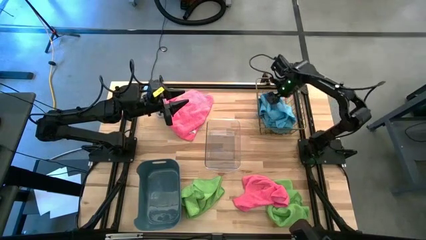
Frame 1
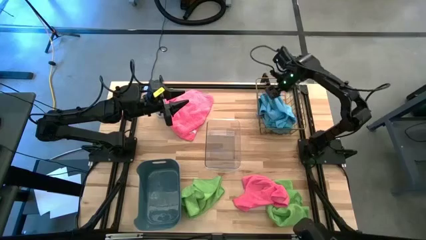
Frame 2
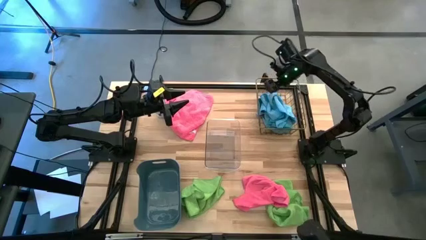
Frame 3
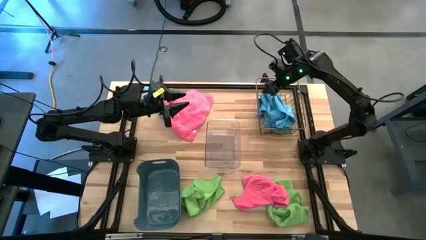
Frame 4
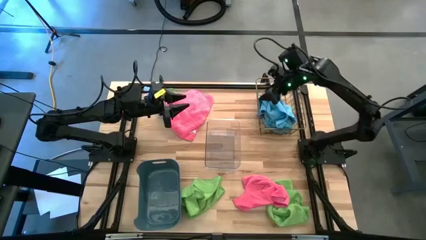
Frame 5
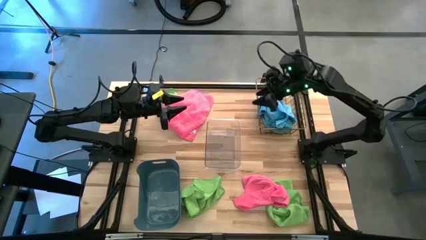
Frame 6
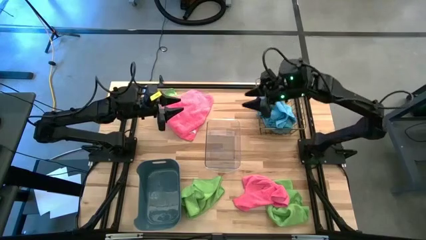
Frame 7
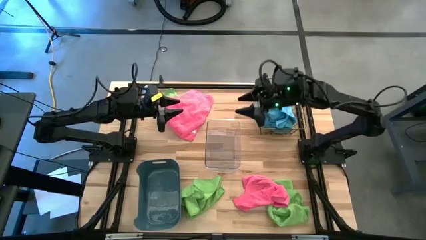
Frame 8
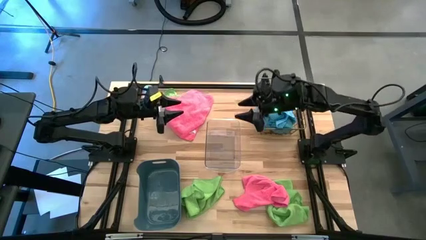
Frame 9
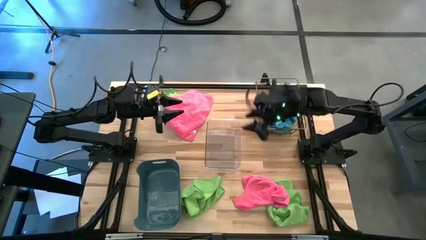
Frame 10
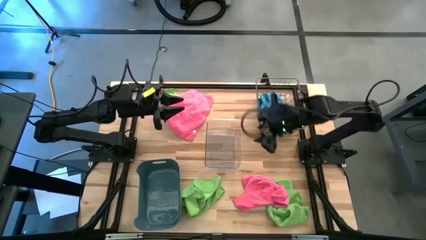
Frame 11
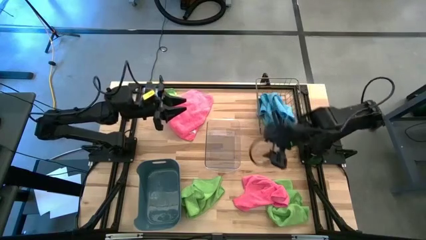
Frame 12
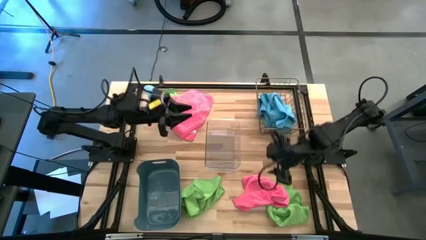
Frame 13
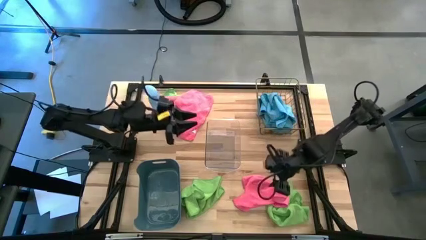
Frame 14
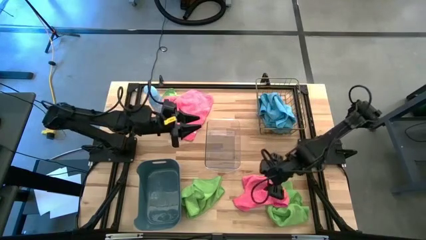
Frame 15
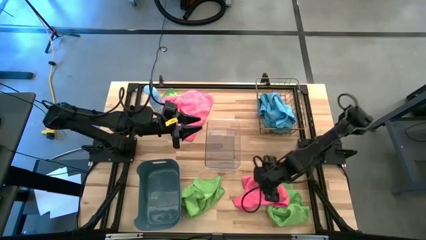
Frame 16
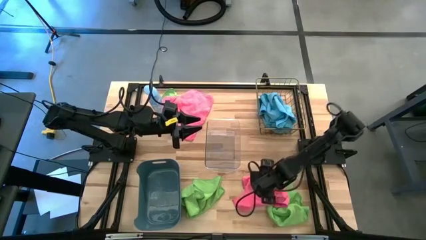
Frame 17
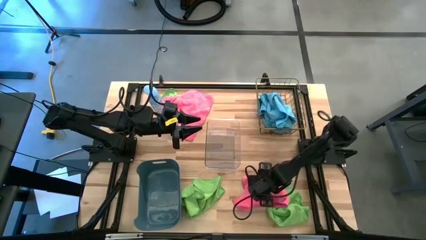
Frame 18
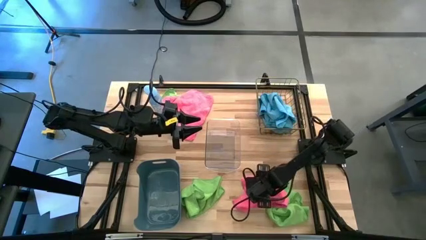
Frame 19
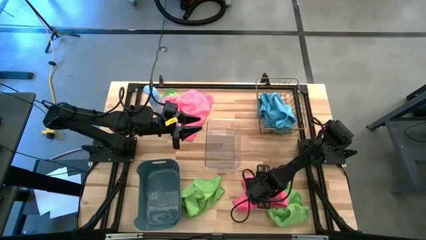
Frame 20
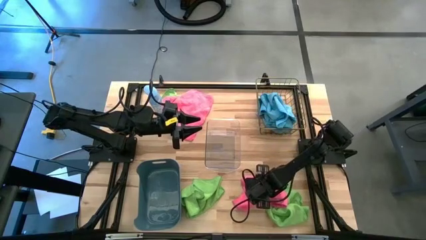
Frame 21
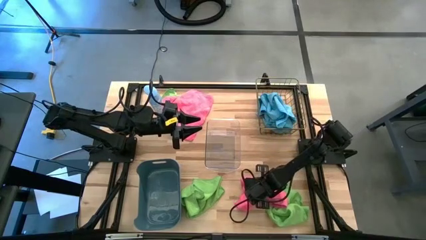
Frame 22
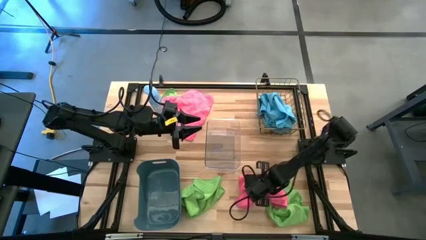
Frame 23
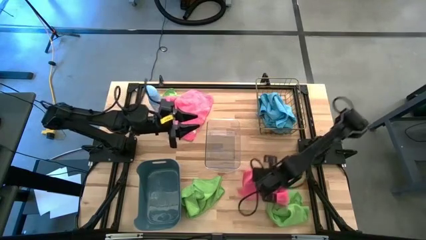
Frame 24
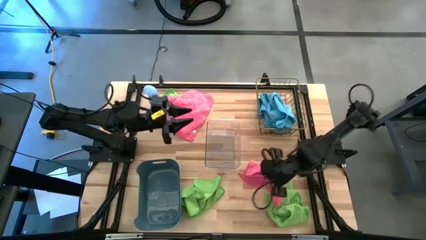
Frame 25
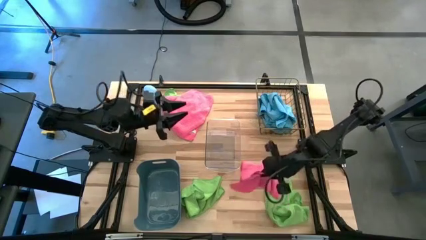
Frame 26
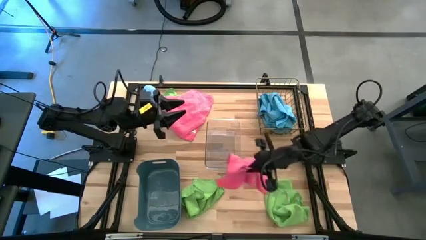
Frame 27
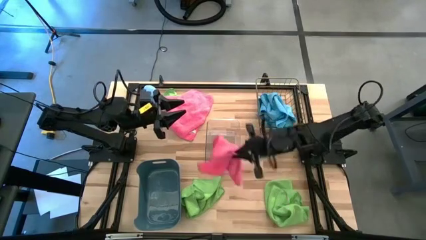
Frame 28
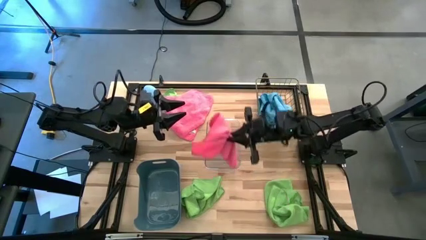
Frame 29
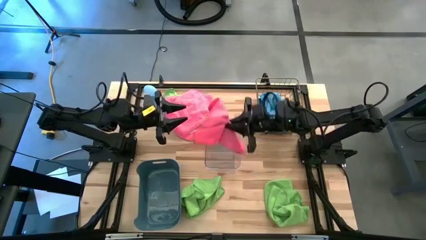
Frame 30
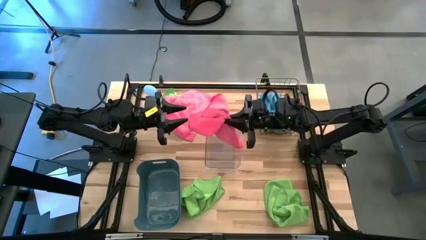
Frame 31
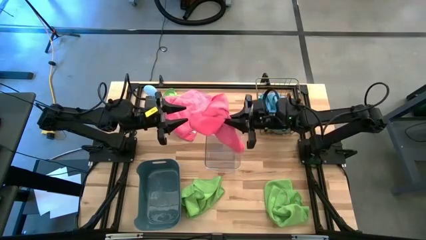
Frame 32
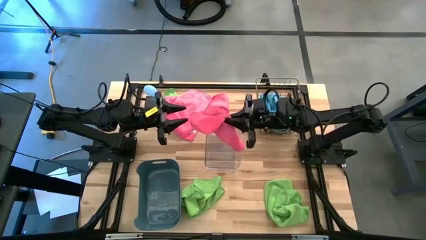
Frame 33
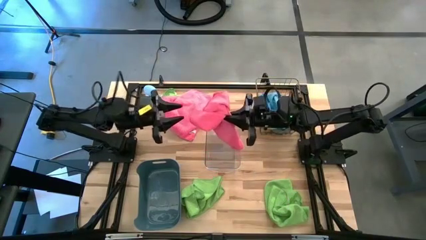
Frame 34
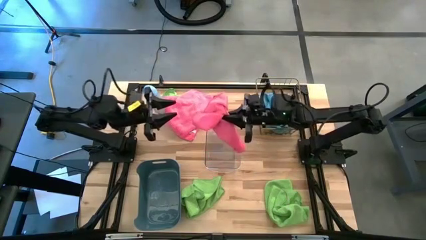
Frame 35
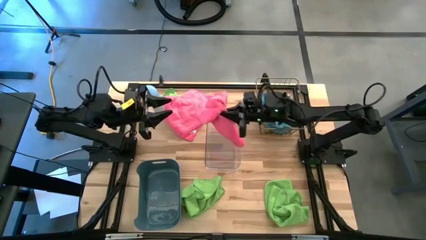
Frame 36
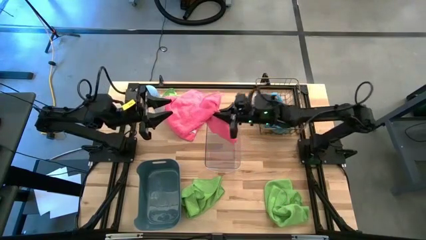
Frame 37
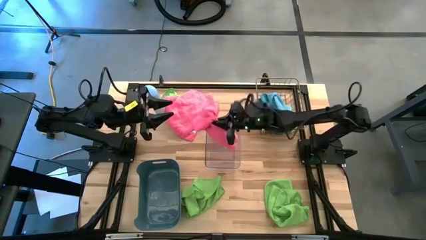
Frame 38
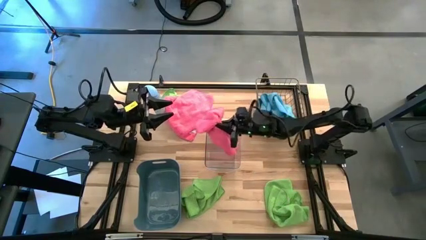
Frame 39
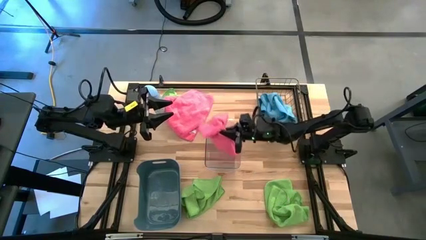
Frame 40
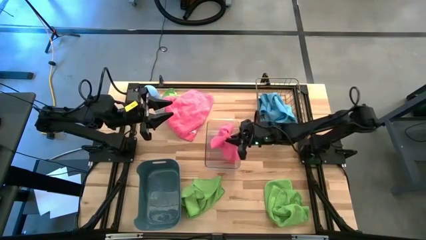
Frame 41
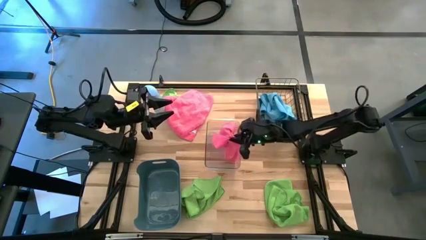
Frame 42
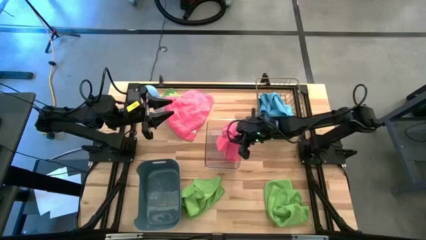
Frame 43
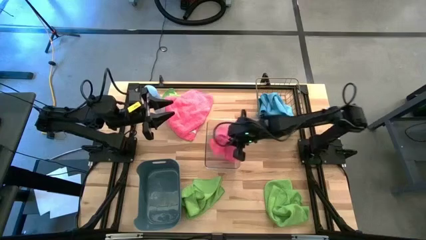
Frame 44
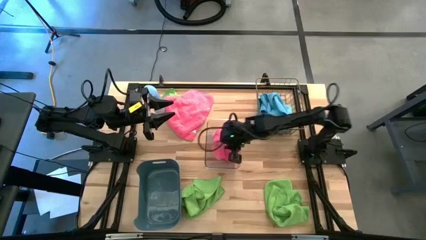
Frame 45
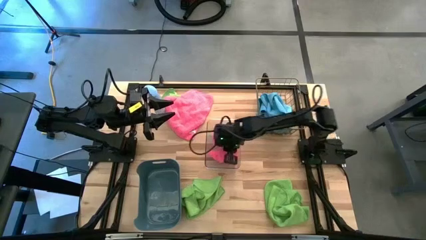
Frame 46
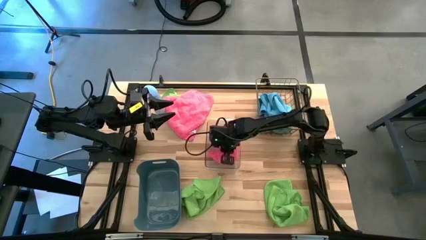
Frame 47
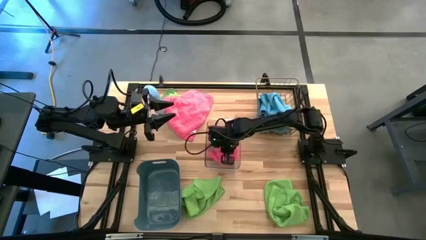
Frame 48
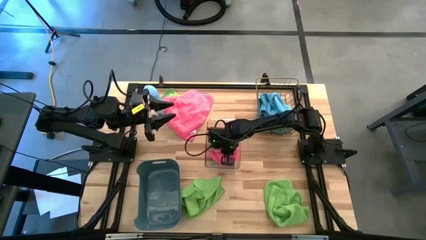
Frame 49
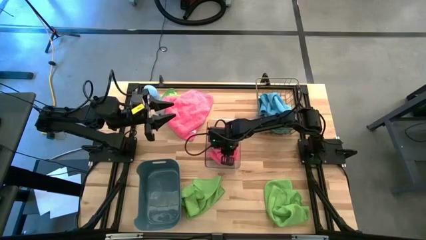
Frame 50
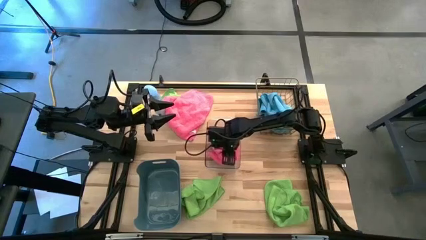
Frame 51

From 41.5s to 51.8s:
Task: Sort microfiber towel by color & place in baskets
Put the bottom pink microfiber cloth into the transparent bin
